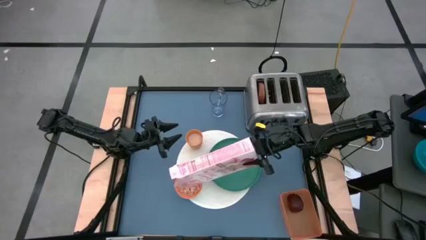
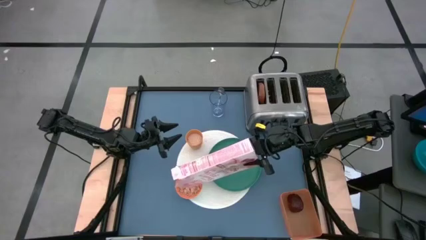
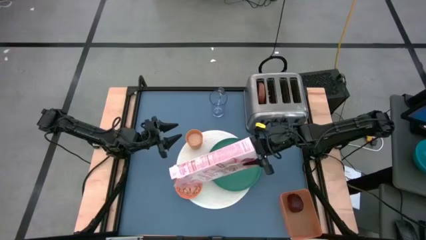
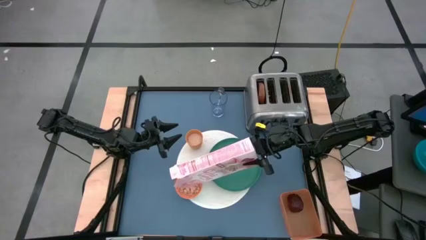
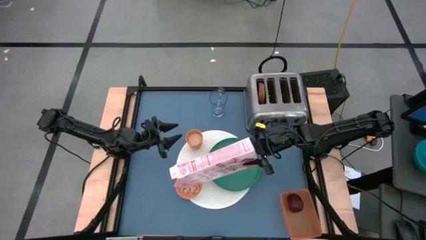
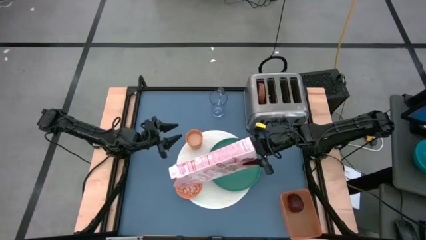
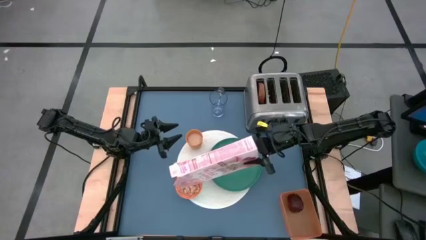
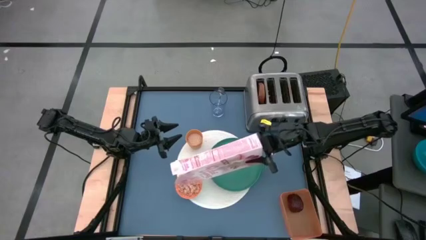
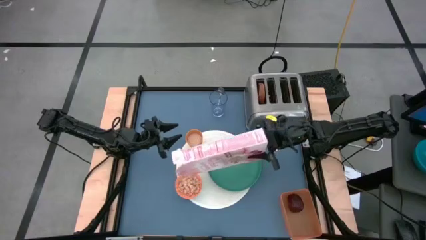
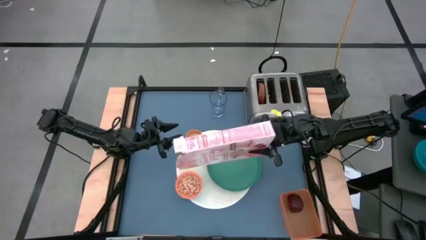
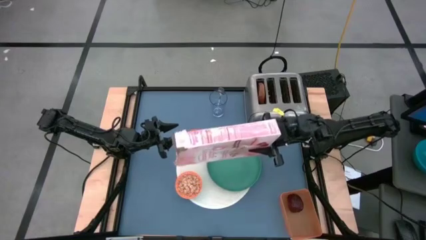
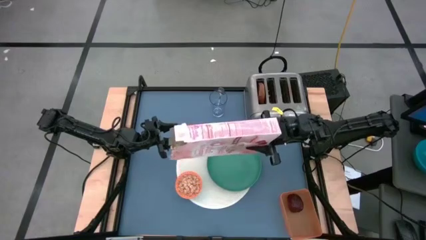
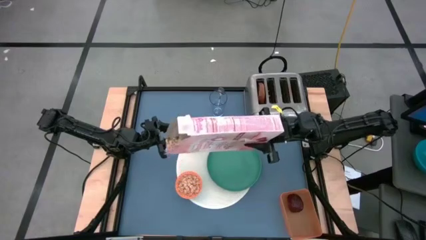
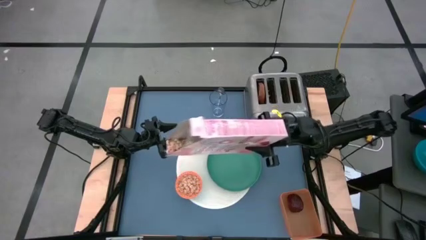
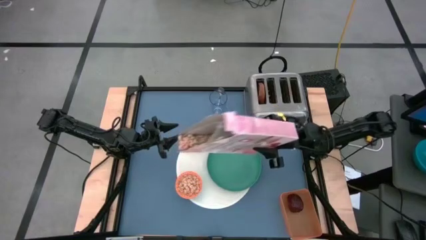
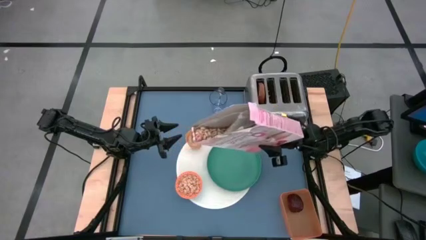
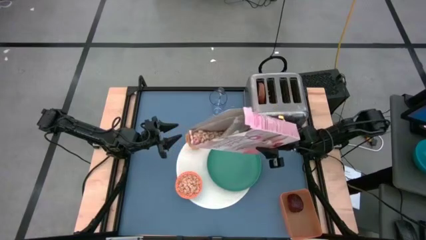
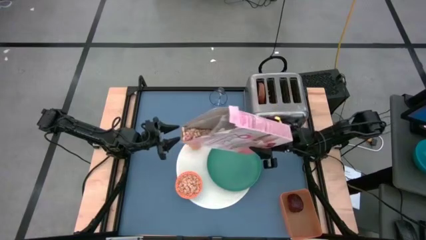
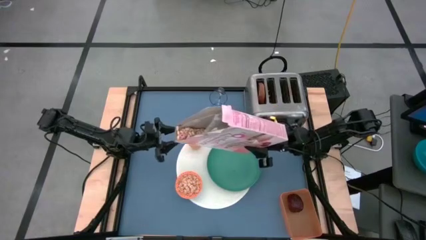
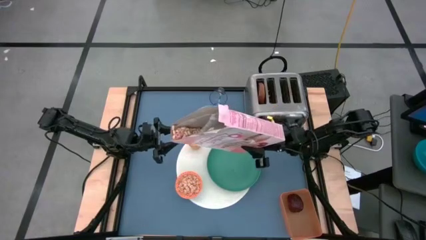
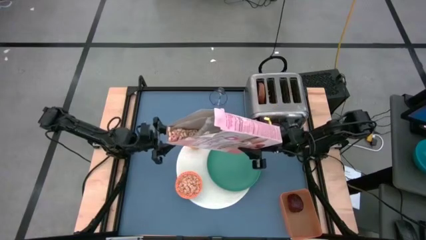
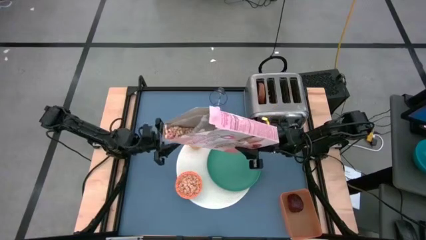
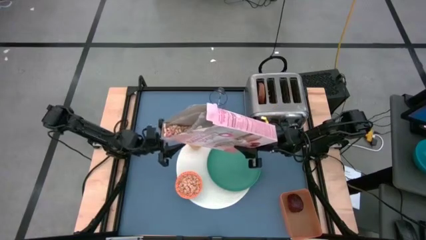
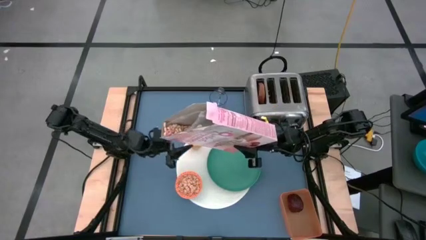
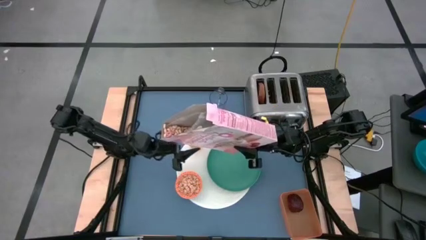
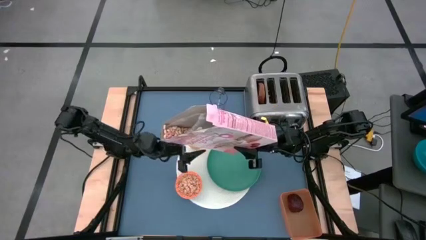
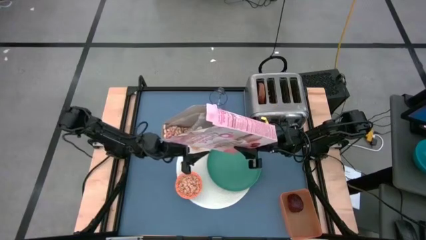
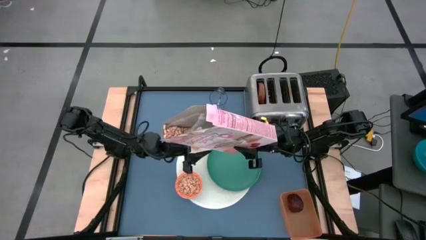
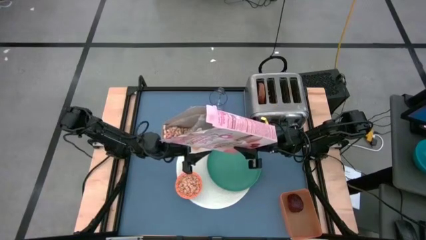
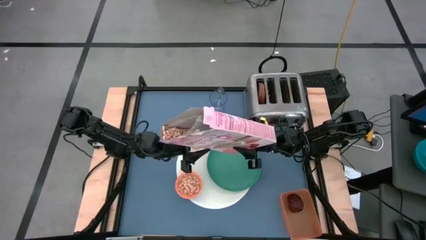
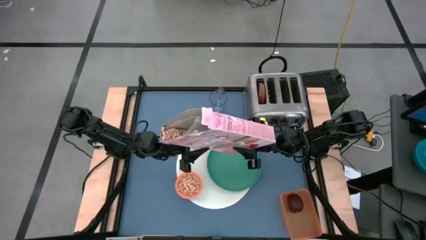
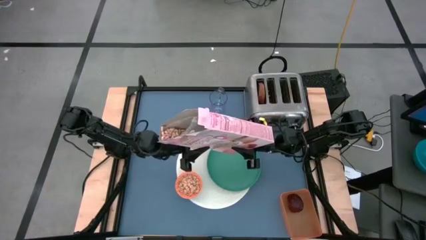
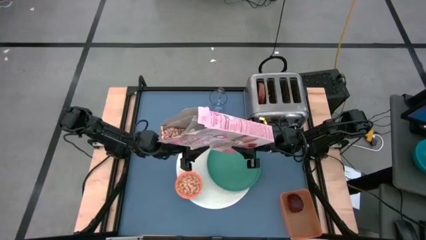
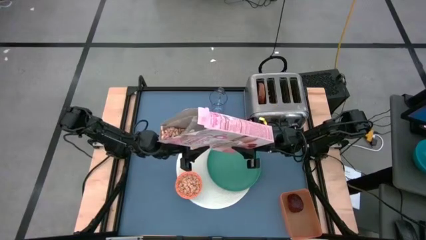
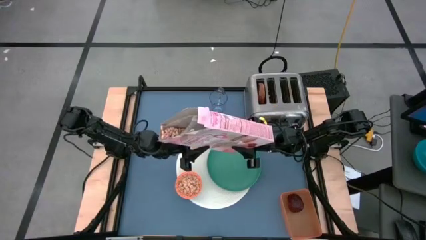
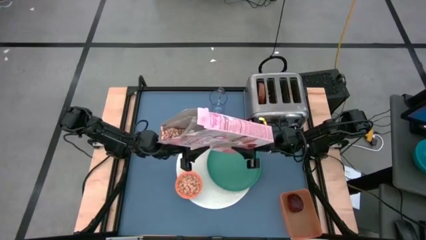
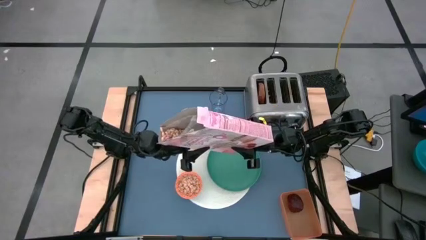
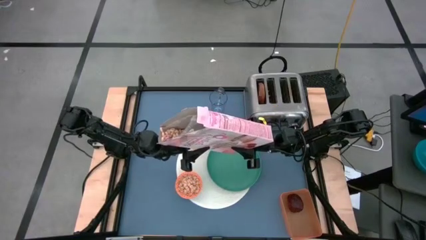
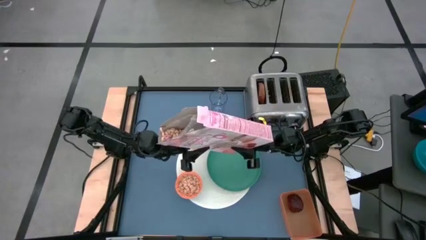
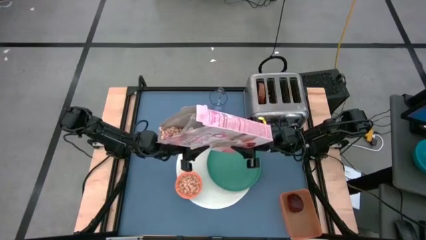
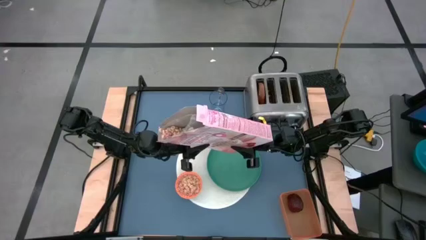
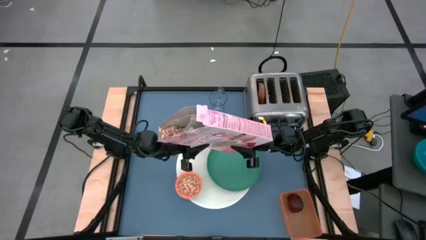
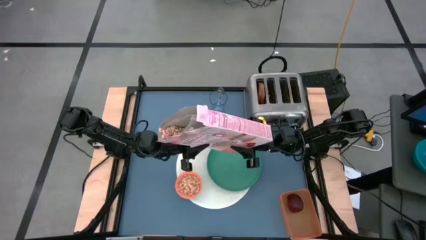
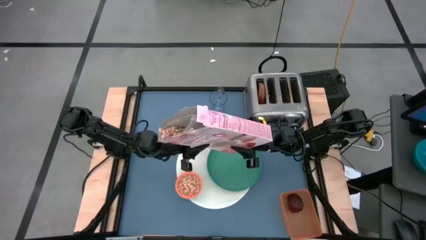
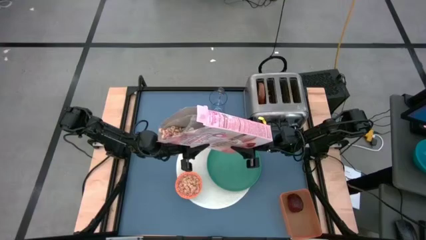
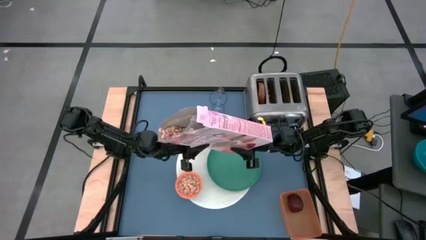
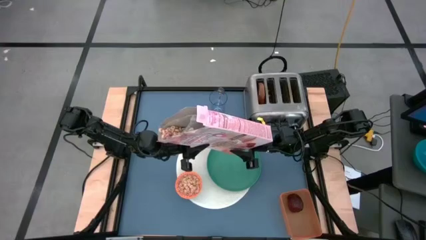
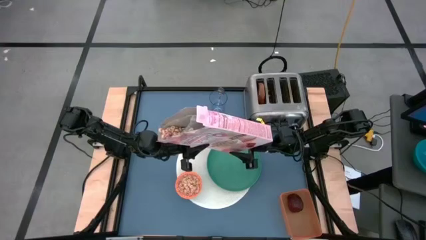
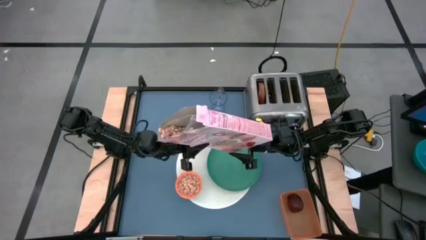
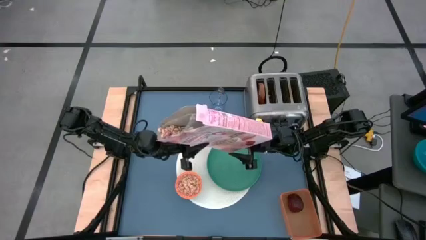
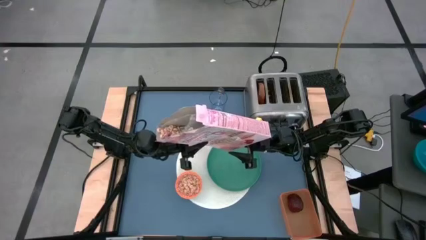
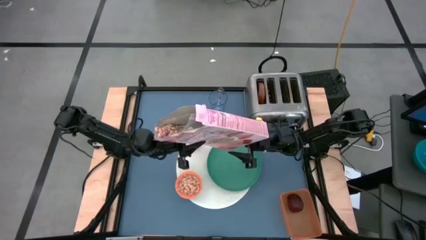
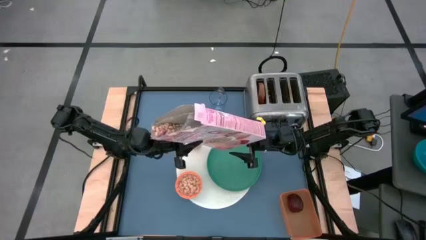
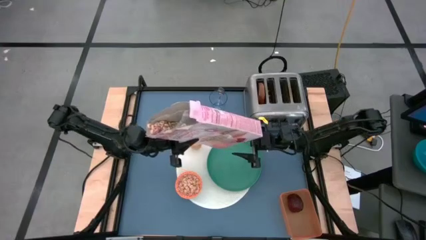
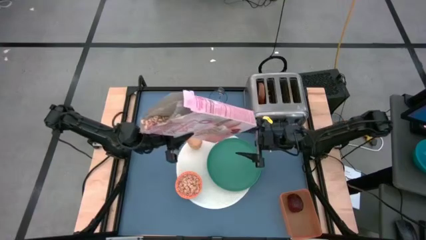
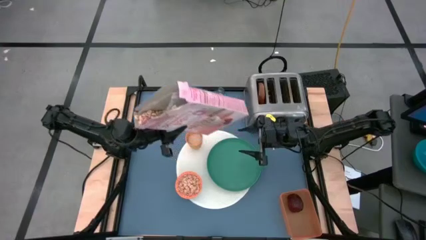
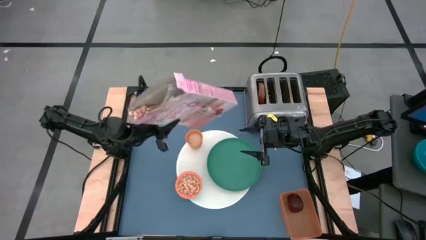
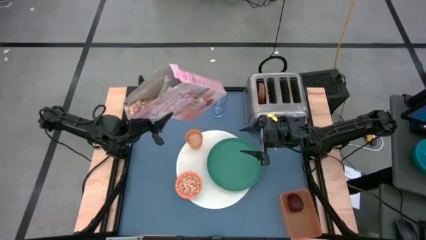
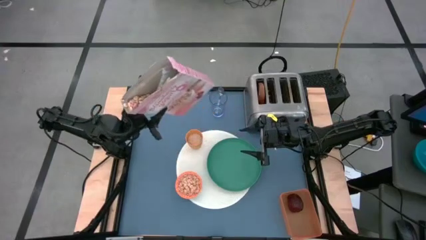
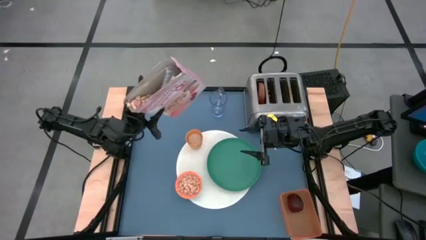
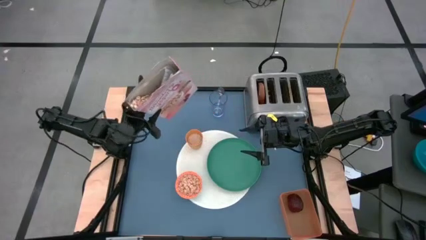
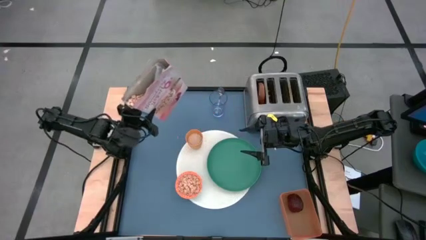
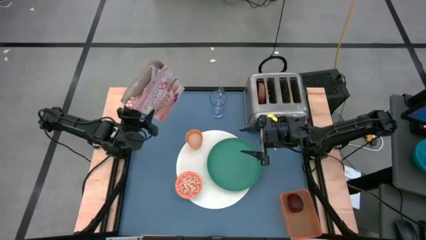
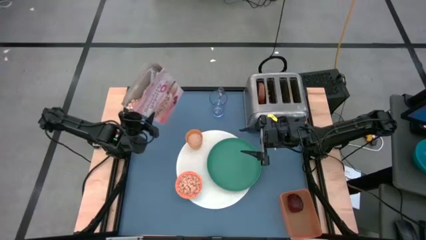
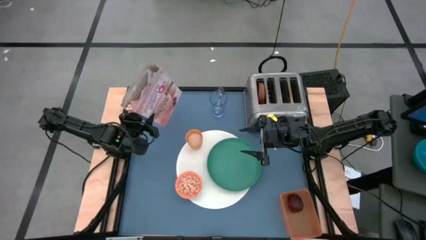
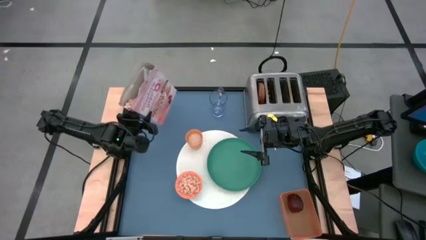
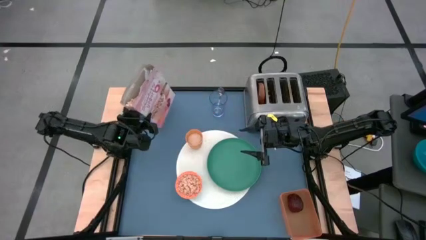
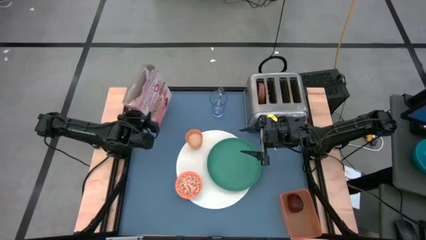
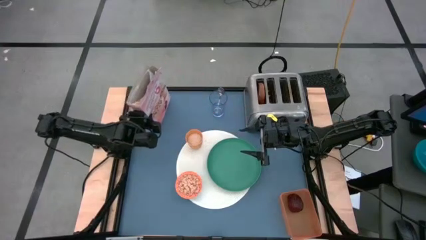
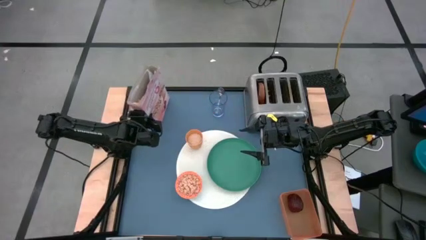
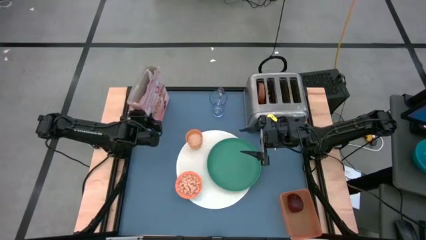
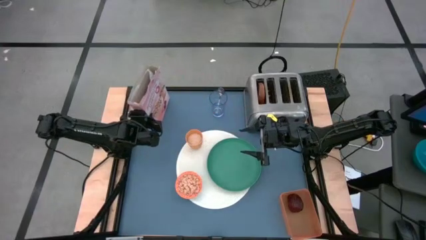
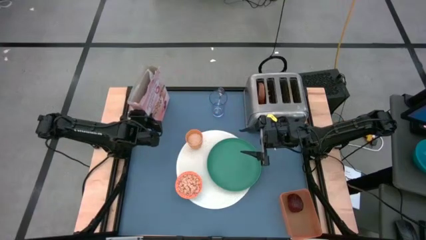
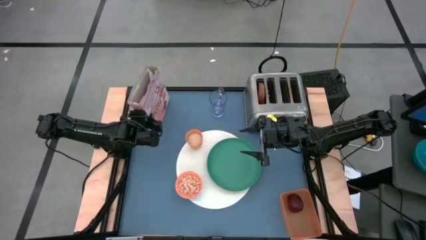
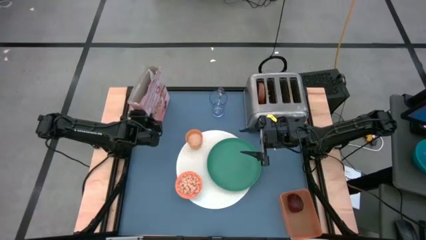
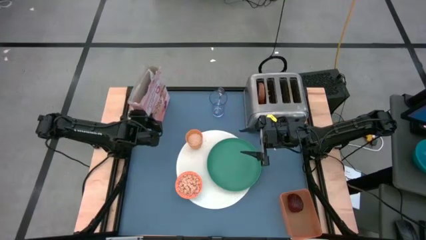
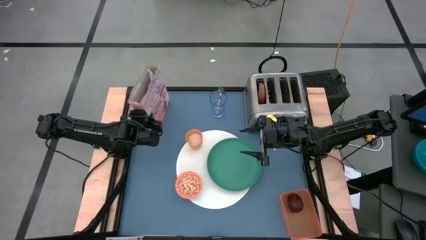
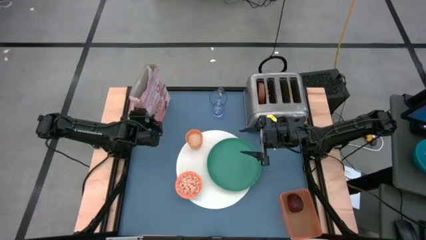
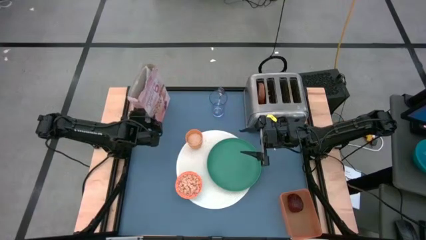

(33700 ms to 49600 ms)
Task: Arrange a breakfast setting
Pour the cereal from the orange cereal box into the orange bowl
